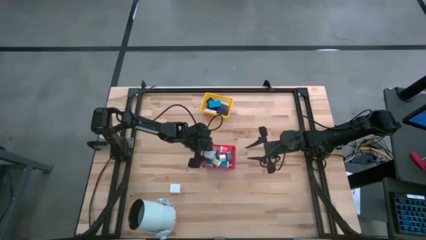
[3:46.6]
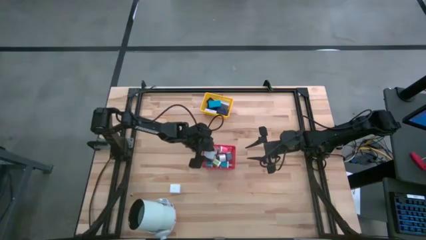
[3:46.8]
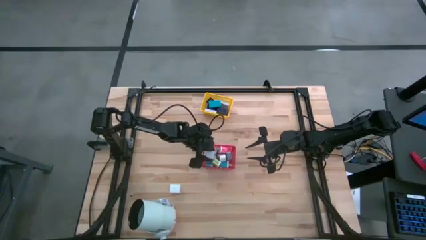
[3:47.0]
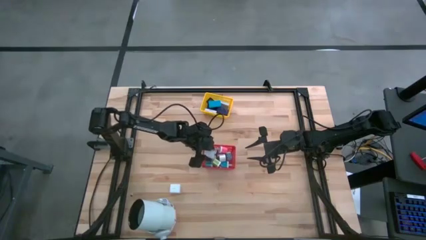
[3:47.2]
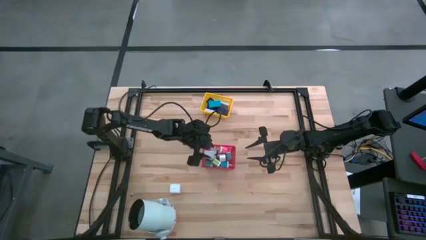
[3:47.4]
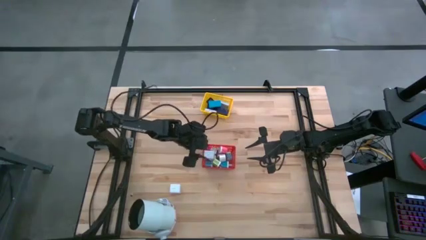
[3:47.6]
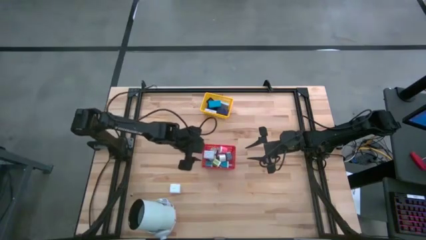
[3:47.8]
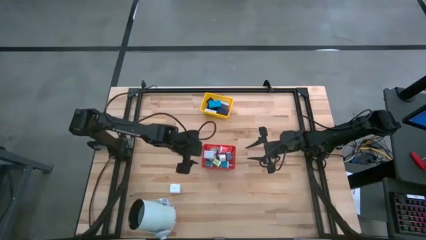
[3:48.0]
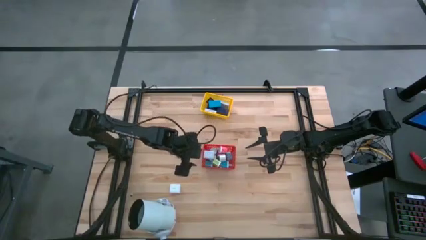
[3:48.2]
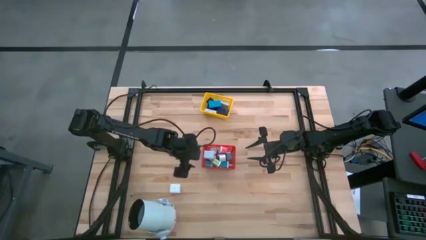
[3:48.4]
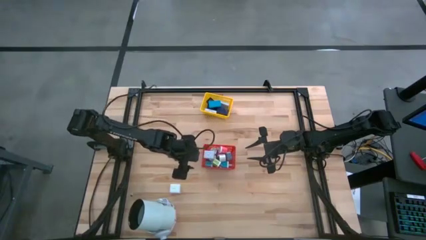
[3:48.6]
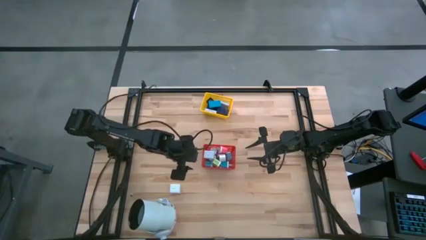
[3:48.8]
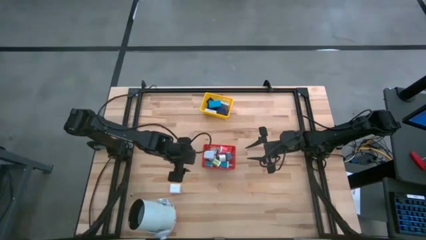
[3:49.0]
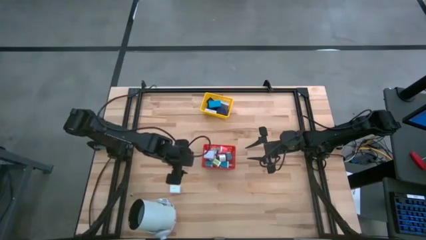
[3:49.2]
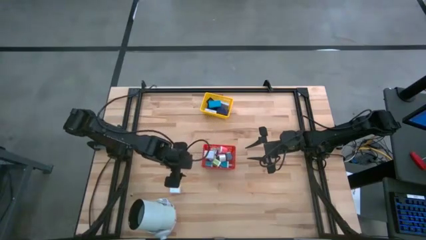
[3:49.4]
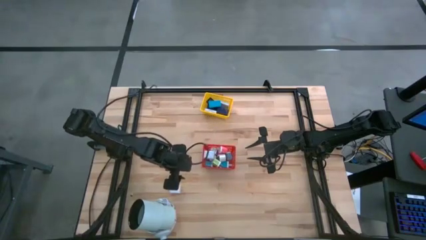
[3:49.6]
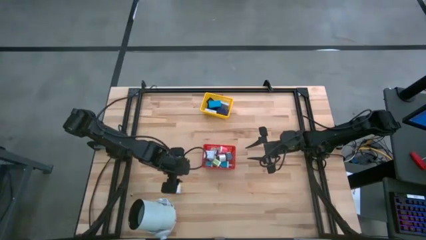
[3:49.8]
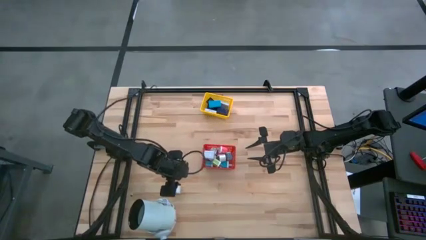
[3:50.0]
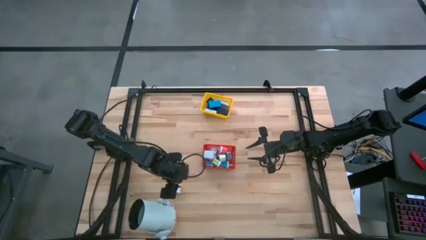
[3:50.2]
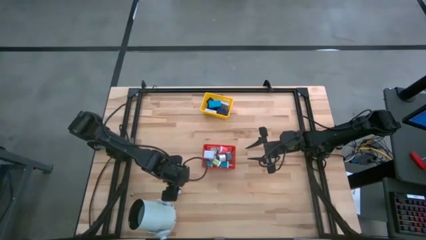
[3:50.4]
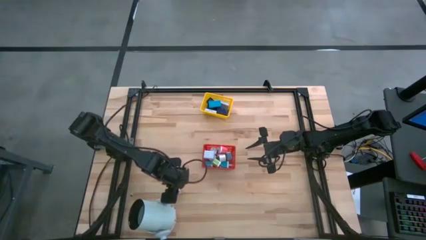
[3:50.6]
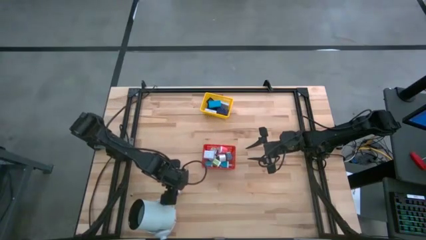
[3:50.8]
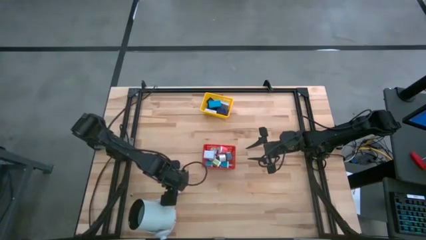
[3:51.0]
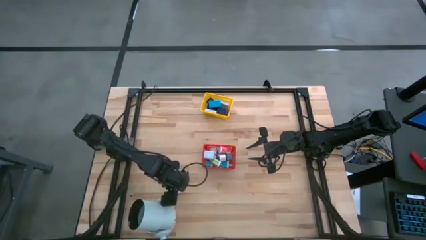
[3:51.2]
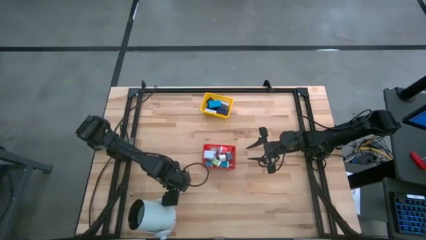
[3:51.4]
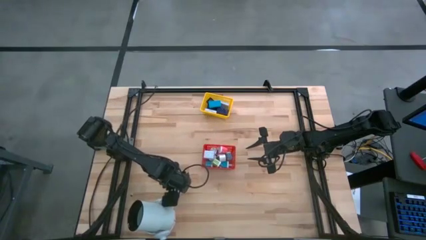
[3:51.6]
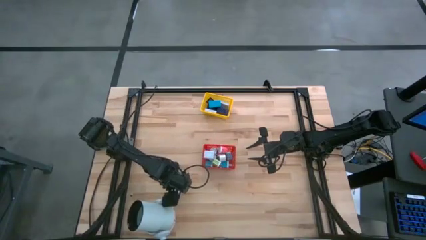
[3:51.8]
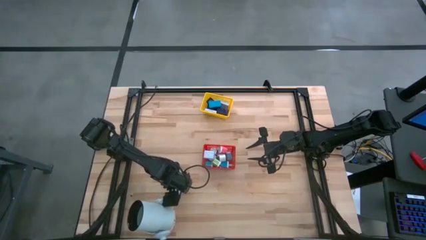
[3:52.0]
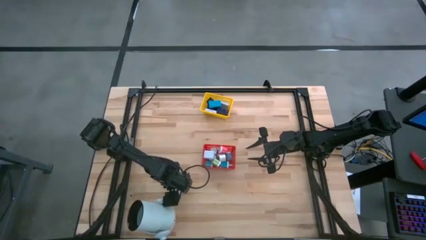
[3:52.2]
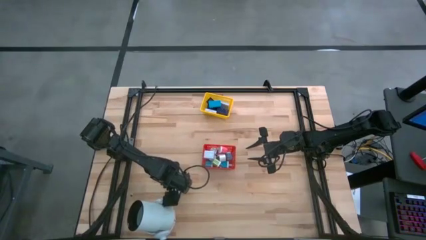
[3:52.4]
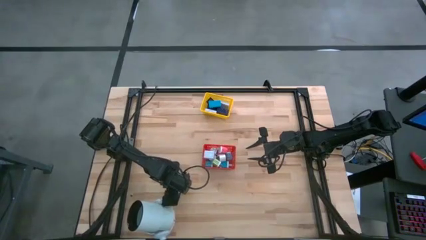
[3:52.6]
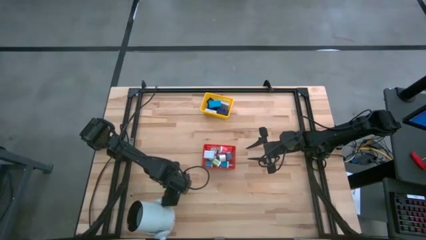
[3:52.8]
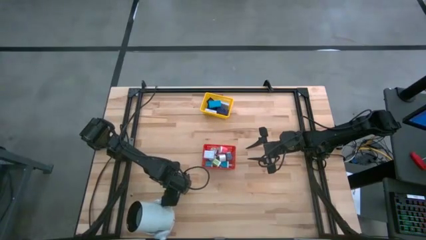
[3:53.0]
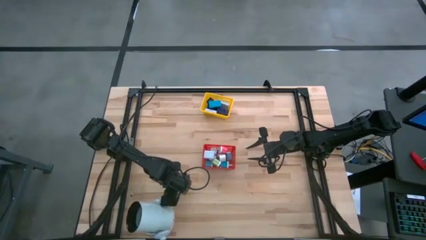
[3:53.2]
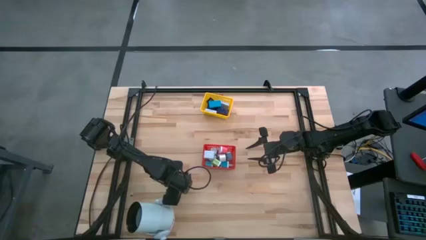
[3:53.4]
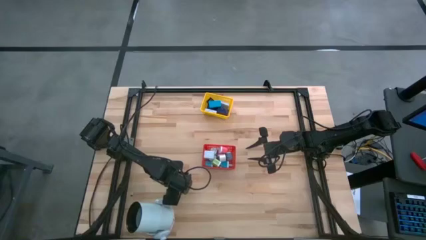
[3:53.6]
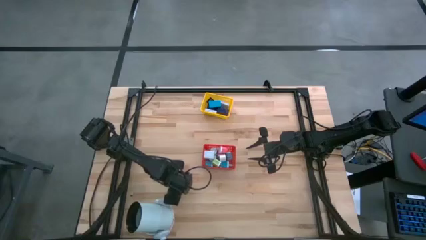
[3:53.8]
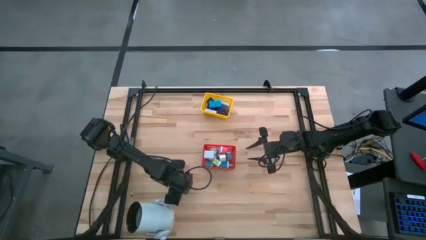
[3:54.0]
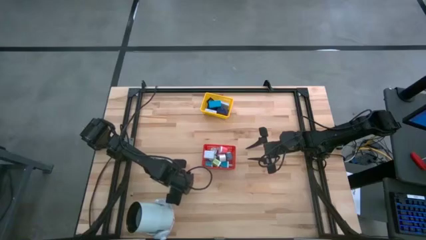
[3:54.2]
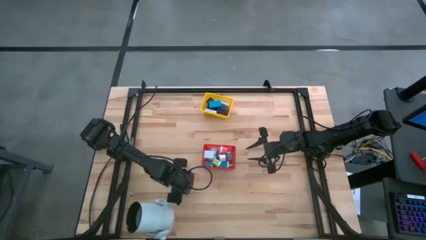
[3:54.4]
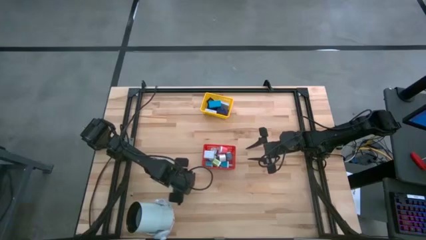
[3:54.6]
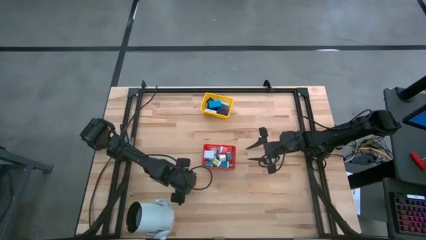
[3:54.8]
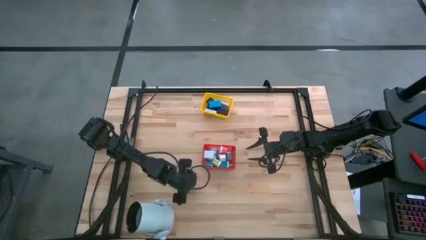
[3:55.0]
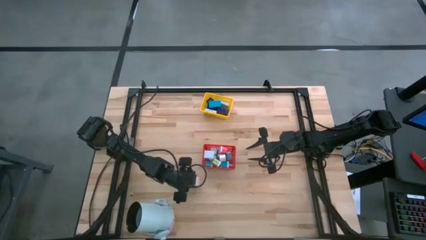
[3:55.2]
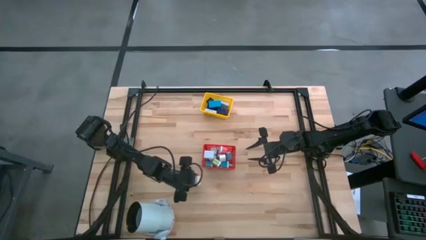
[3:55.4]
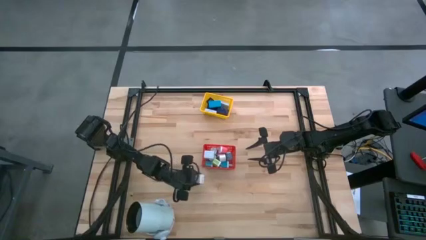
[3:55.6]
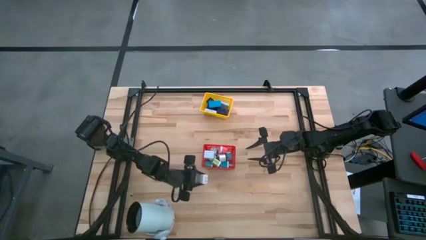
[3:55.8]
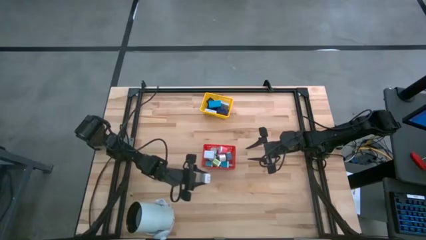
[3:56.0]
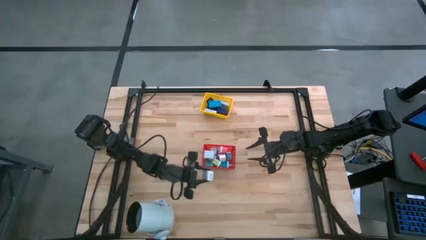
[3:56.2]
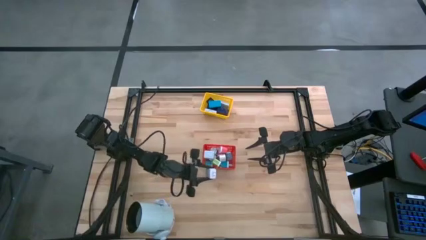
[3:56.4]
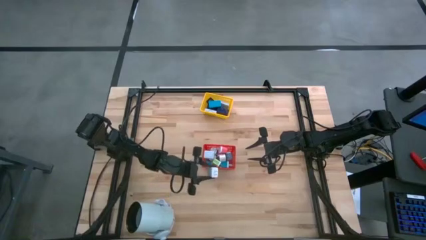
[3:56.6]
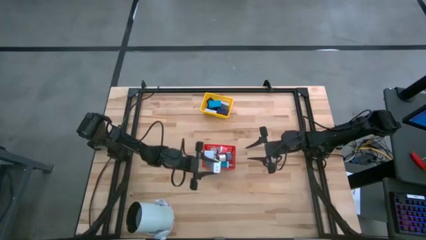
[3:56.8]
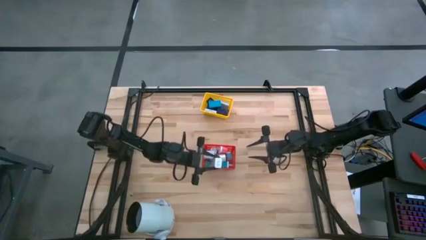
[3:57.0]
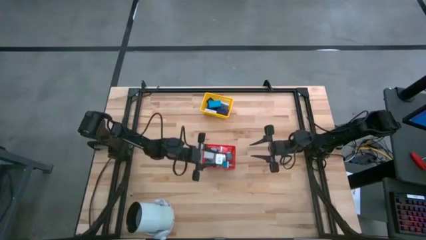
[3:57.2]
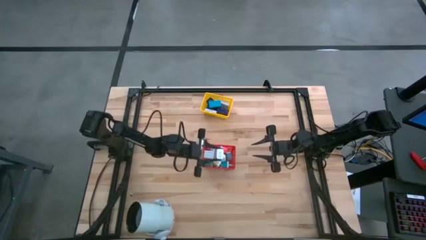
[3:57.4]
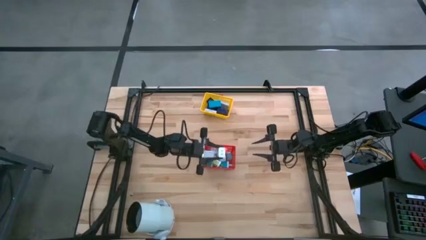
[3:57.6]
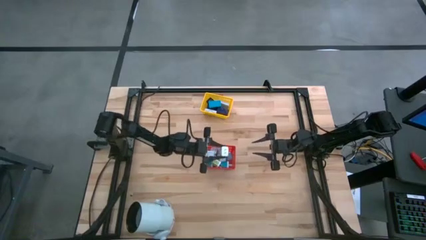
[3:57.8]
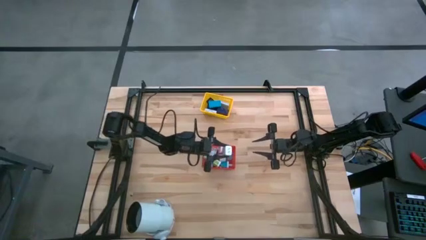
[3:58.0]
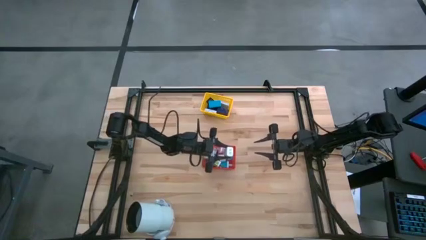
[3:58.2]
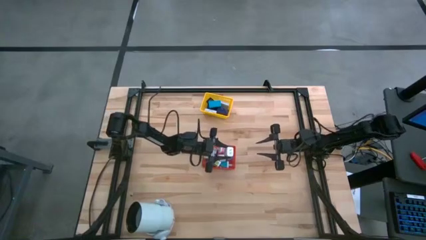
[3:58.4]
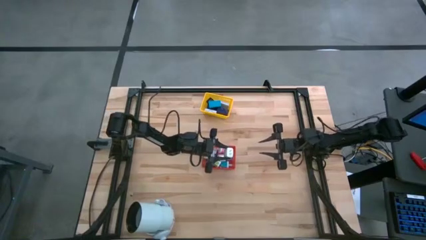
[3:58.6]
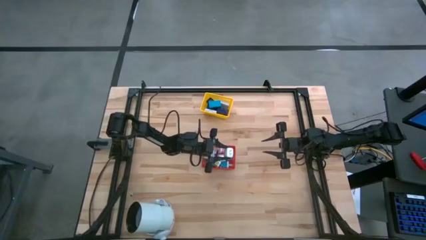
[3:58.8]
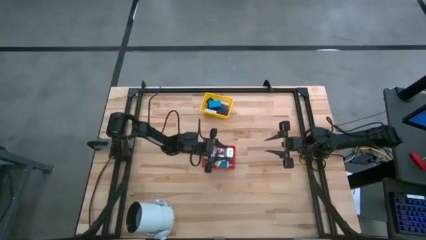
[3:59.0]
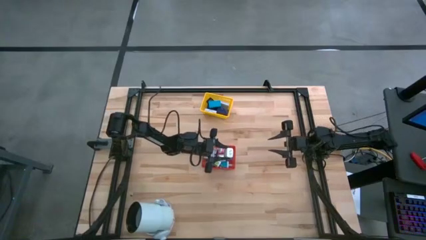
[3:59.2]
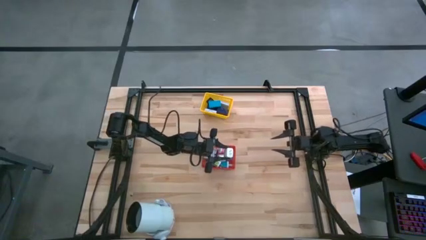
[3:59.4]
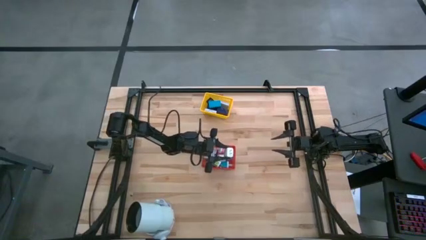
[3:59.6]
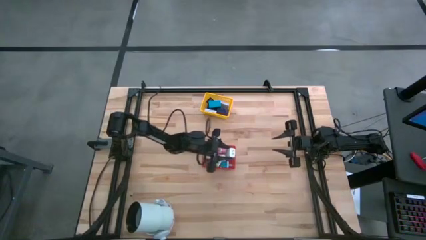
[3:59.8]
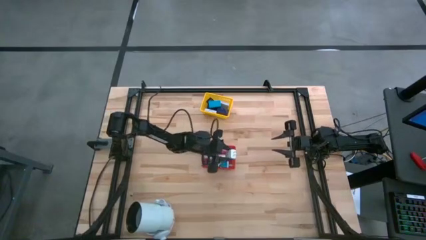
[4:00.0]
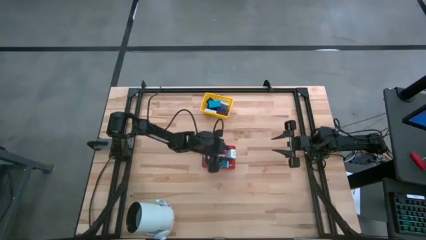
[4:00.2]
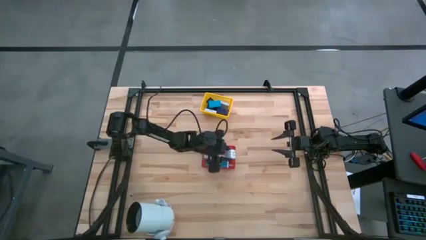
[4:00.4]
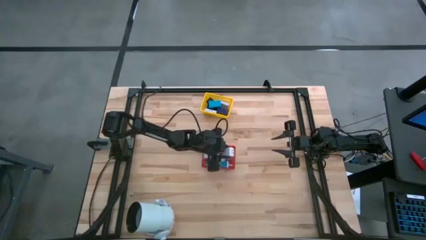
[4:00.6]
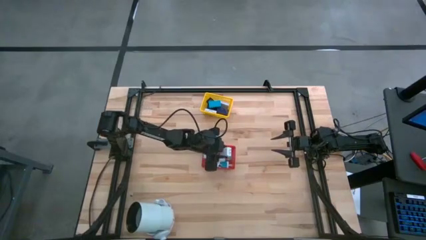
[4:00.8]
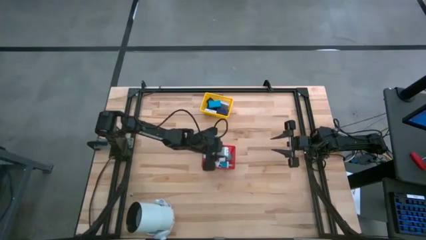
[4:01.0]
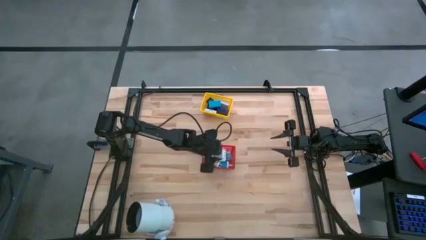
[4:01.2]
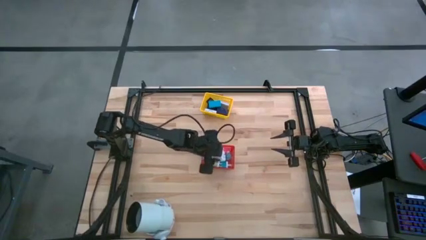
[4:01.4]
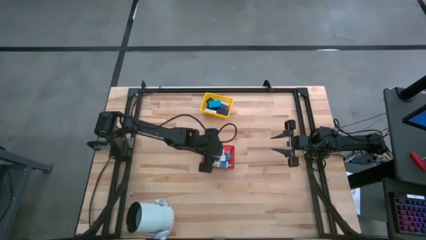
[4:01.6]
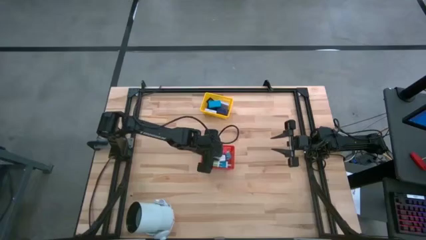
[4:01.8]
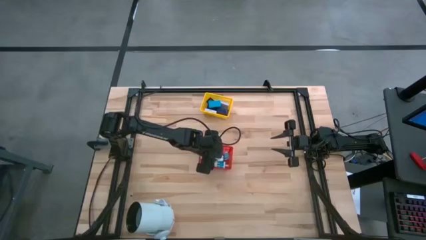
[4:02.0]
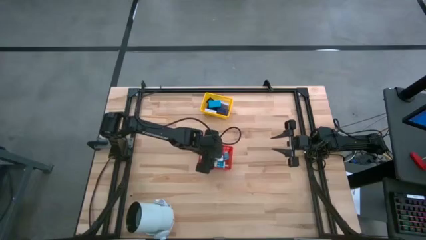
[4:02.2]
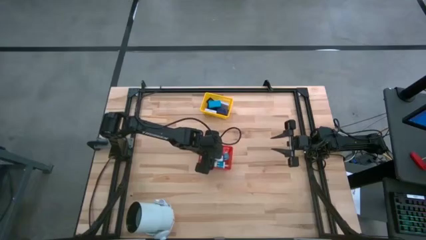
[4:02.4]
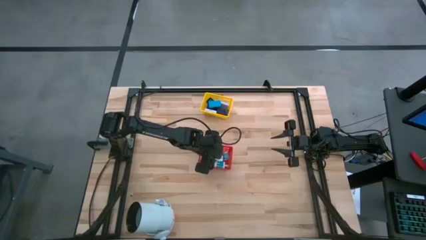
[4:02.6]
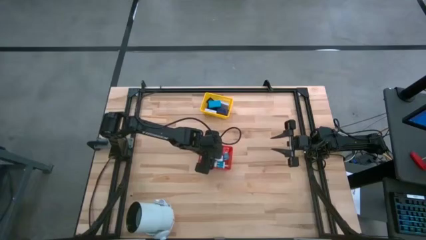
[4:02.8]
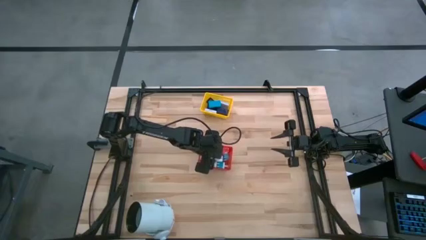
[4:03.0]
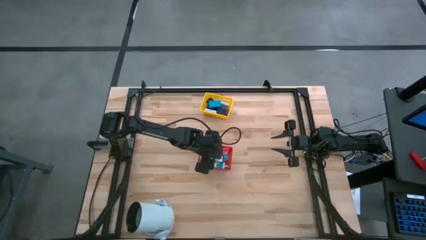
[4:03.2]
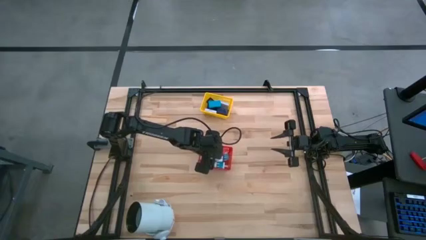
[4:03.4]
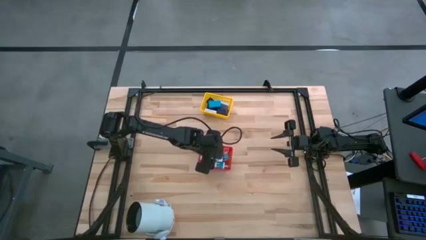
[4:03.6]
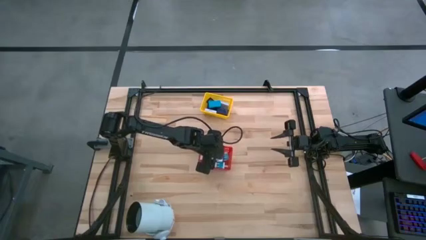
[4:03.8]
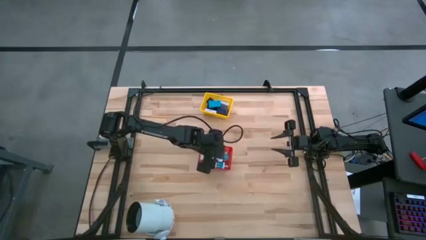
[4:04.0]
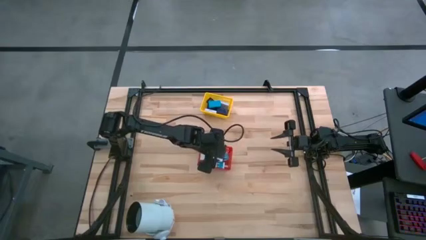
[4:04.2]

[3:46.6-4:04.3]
Task: Pick & Place Office items
Put the white charger adapter into the red bin
